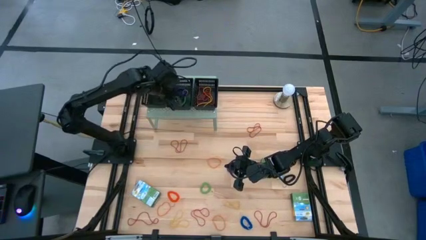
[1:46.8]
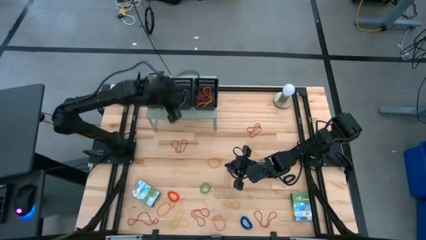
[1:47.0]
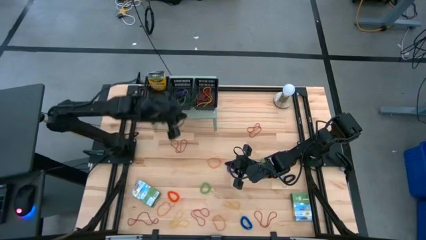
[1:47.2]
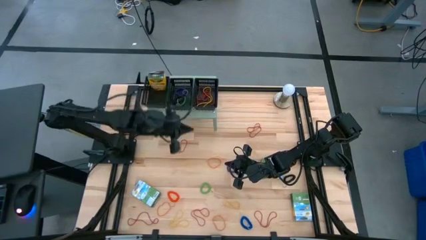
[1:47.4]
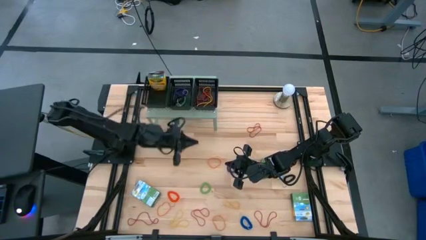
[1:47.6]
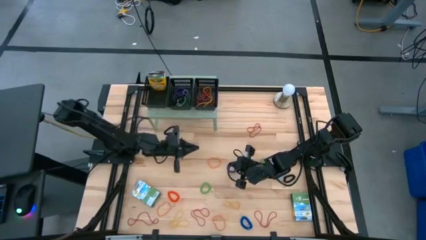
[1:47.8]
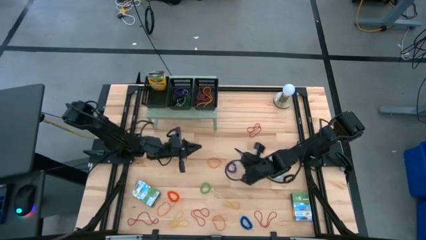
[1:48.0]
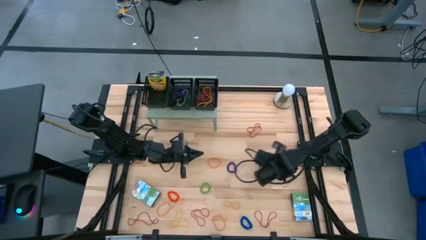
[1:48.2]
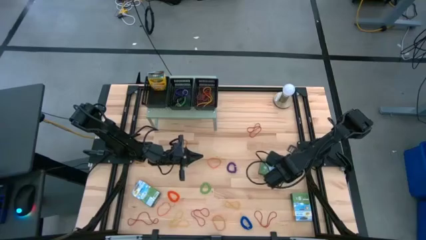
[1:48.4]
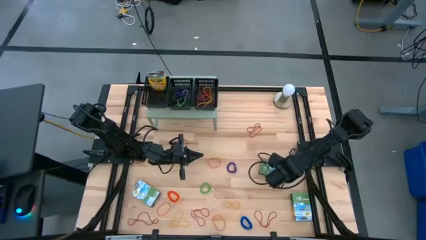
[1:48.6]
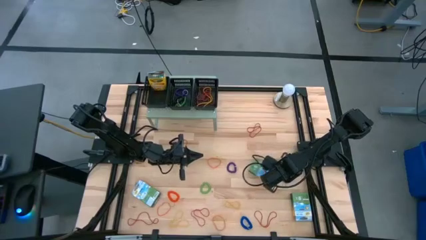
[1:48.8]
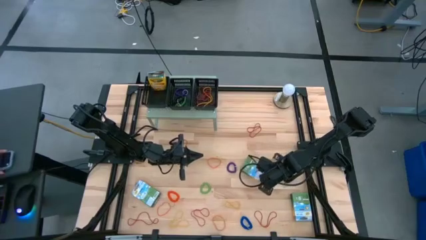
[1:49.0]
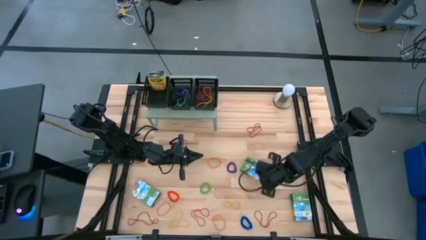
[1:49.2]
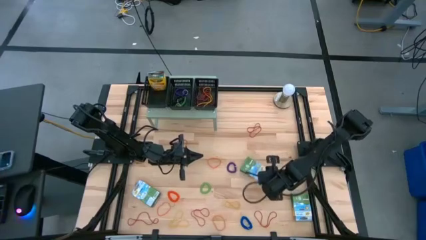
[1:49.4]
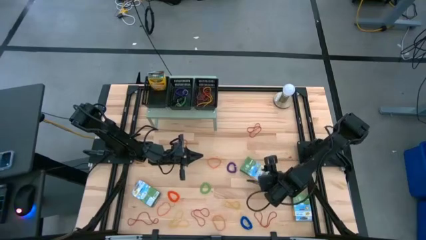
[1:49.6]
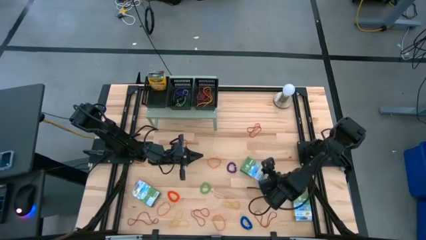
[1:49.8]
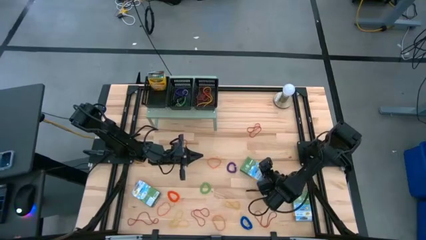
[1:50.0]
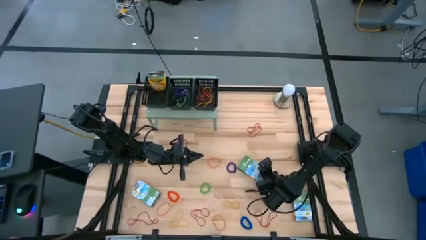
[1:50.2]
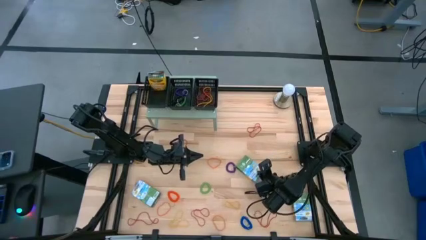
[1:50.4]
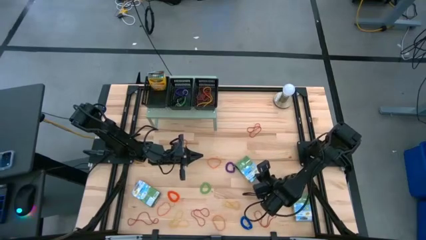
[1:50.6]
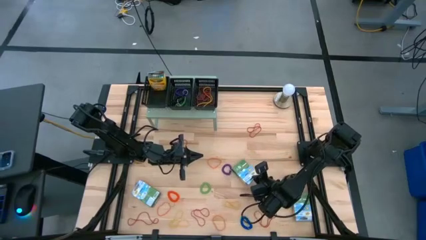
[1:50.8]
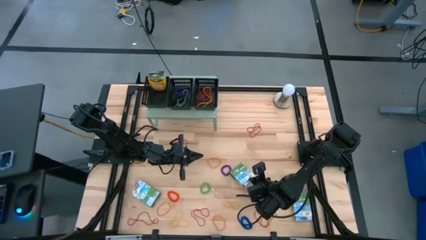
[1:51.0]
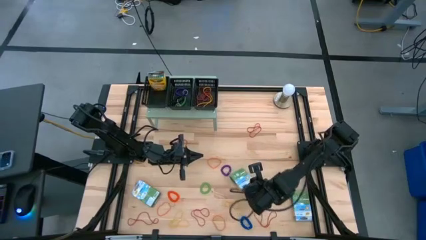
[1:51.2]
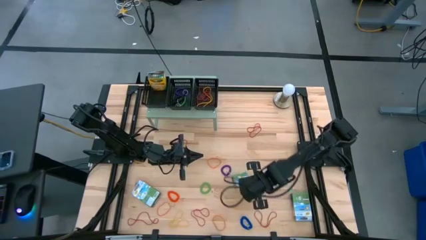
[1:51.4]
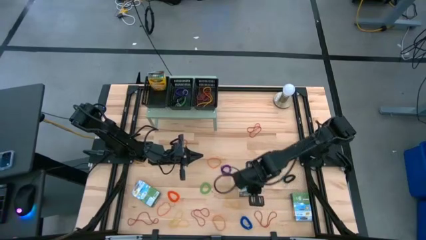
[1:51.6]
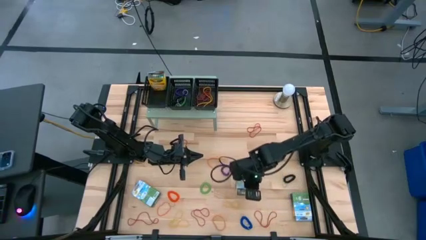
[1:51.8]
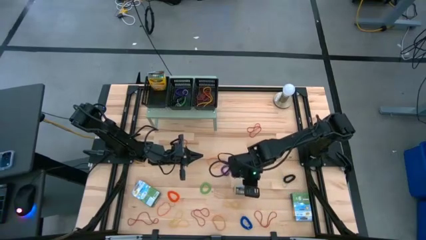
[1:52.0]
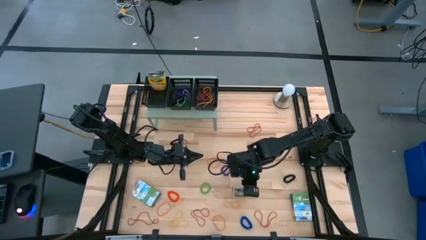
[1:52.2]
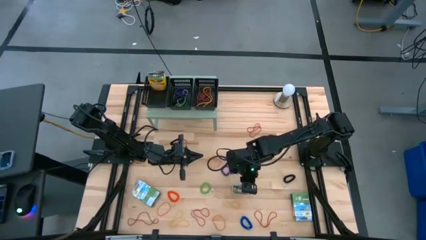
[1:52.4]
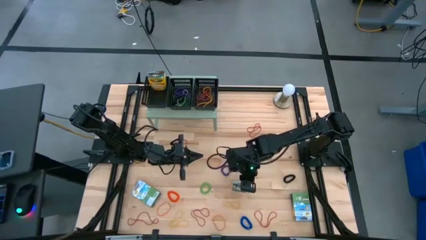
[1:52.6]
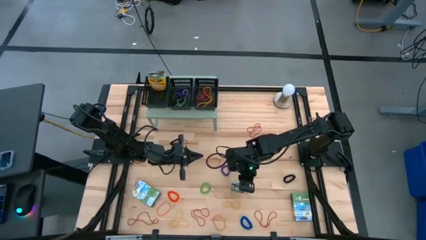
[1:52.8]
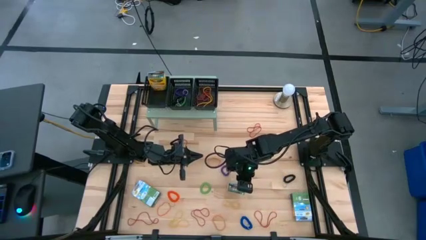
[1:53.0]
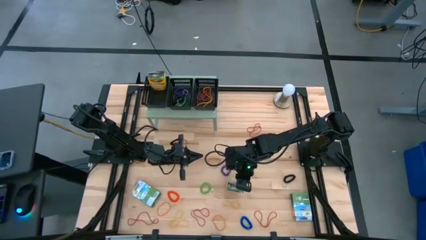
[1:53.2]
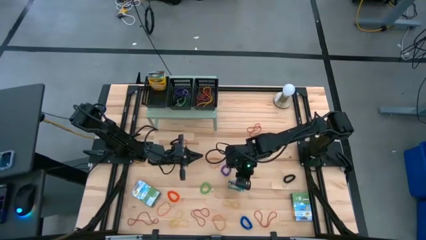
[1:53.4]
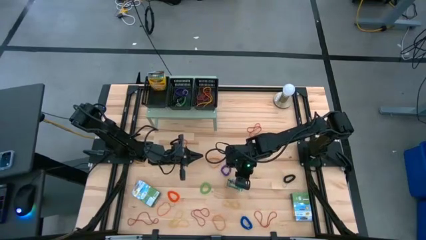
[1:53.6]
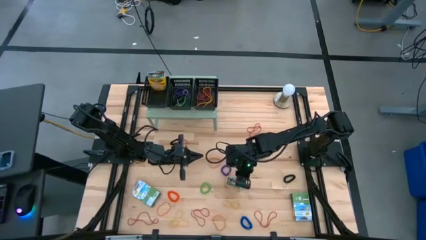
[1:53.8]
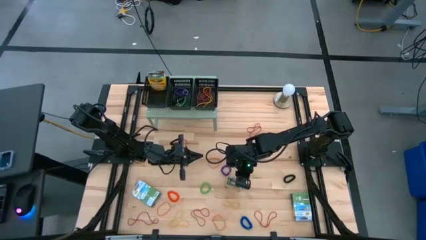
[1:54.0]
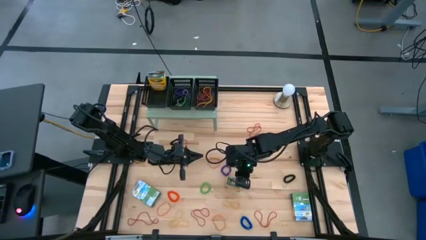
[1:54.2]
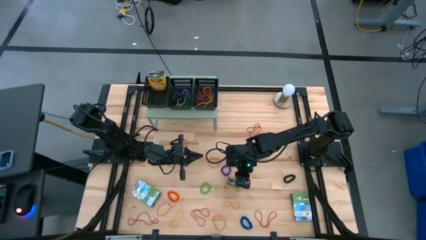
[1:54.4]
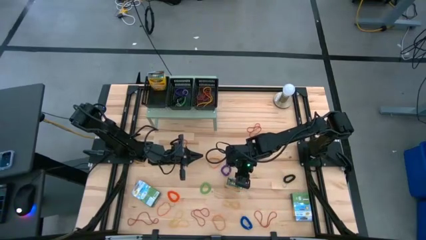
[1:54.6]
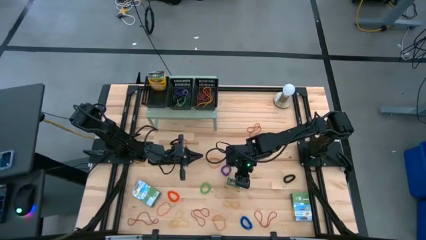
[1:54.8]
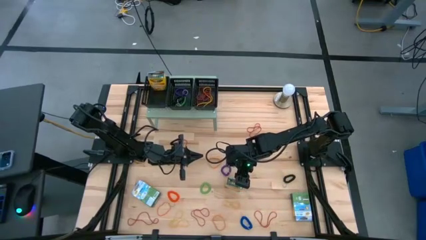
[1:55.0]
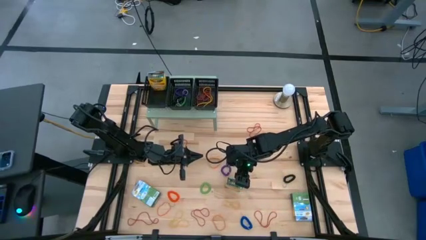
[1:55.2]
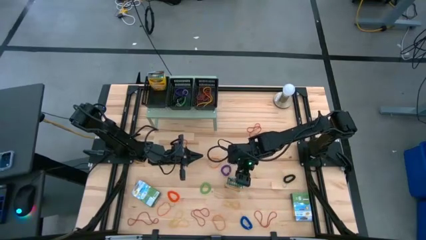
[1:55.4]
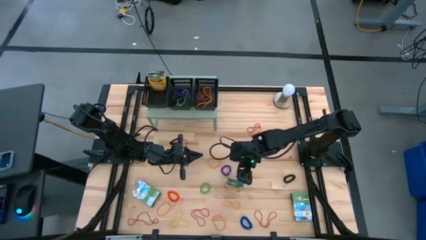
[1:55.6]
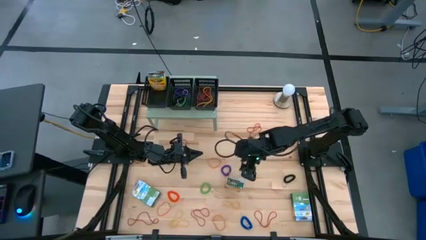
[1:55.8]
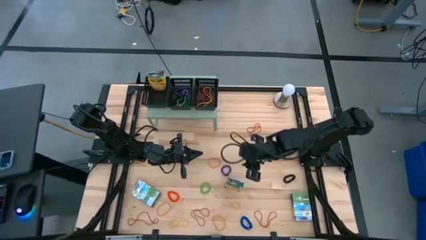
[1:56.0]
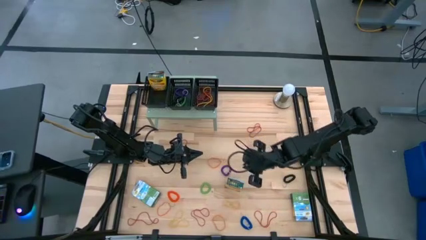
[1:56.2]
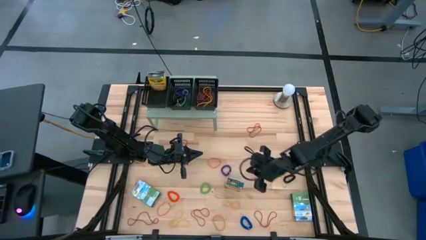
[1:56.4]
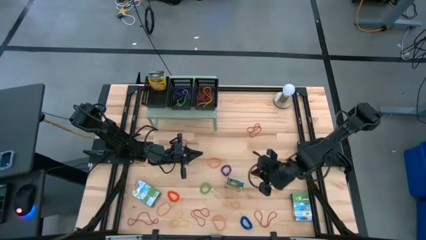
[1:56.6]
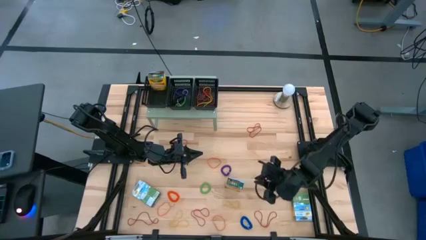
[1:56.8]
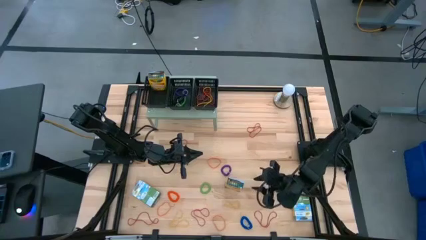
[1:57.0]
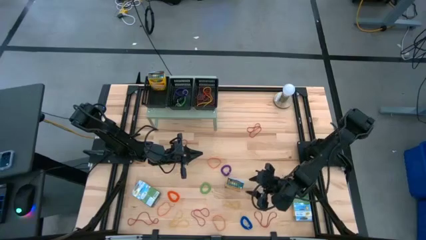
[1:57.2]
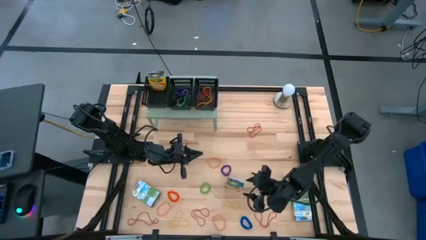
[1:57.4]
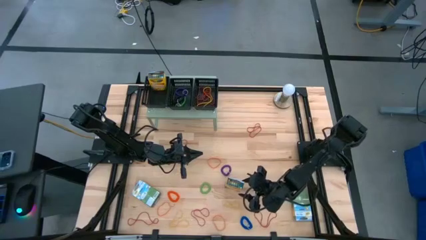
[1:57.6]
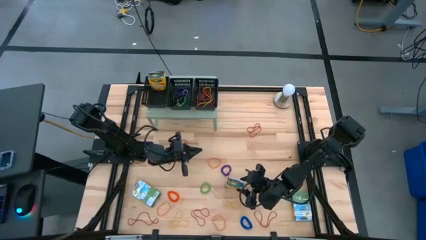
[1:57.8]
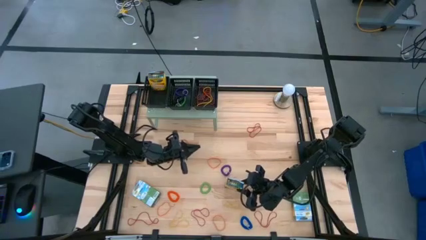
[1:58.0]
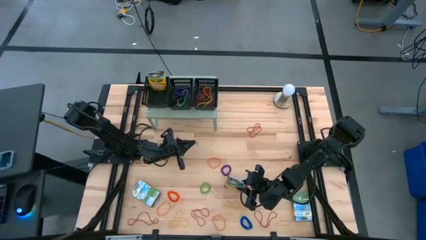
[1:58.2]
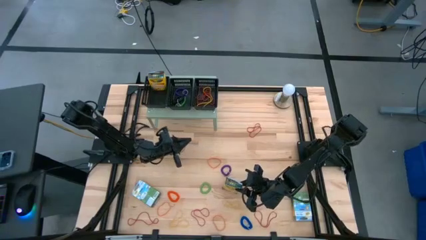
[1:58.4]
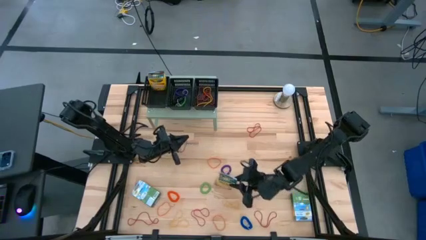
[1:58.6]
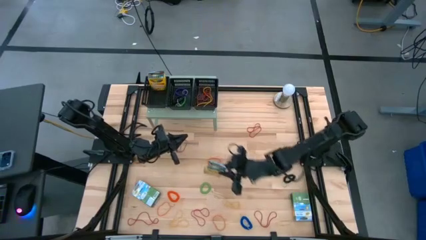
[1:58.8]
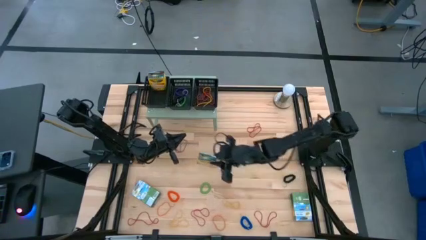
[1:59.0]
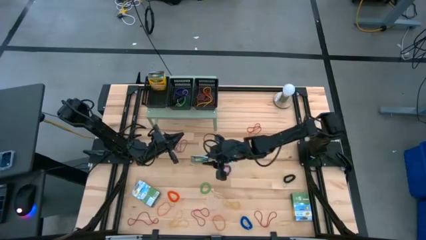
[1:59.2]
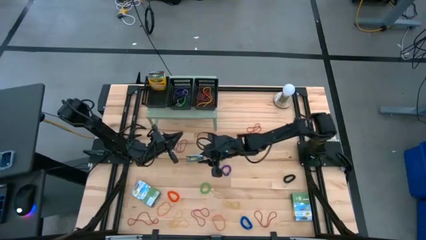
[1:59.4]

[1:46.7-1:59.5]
Task: Pick & Place Office Desk Supplies
Put the crayon box into the left black bin on the shelf

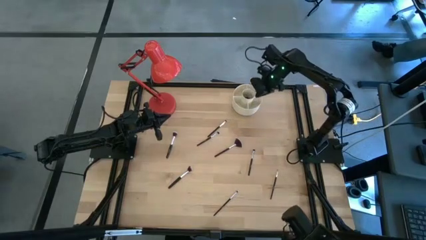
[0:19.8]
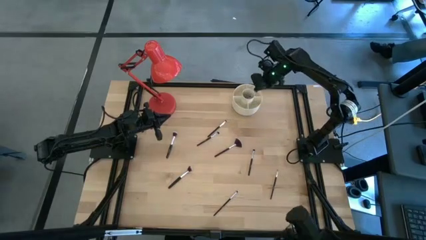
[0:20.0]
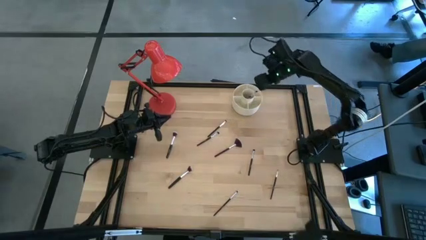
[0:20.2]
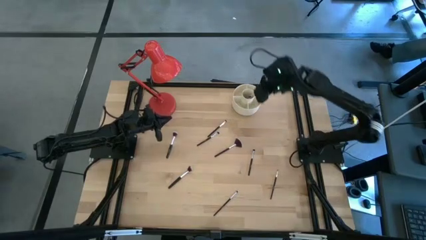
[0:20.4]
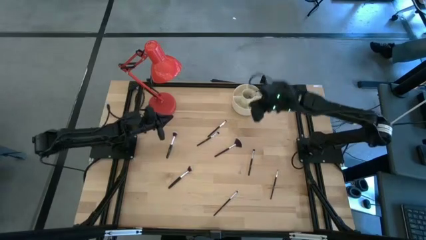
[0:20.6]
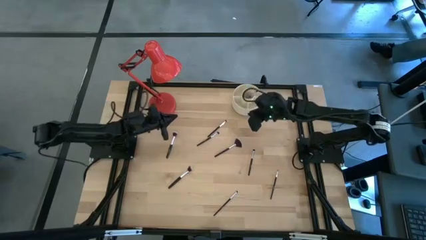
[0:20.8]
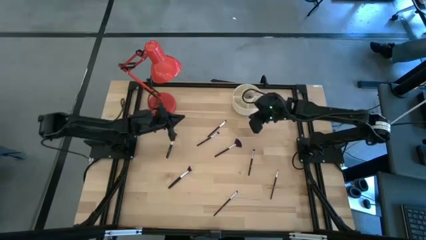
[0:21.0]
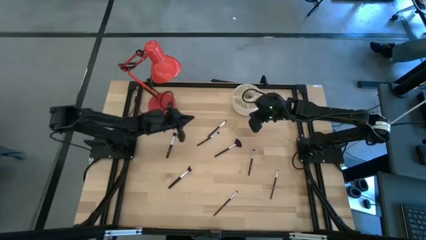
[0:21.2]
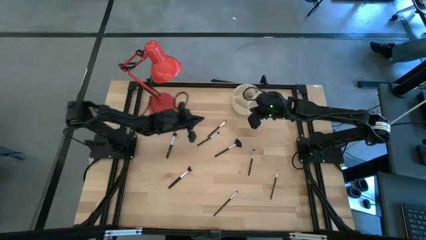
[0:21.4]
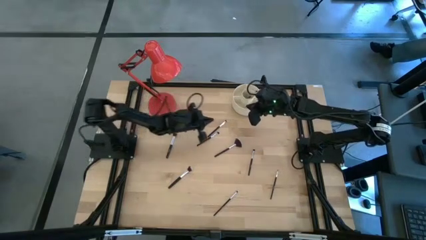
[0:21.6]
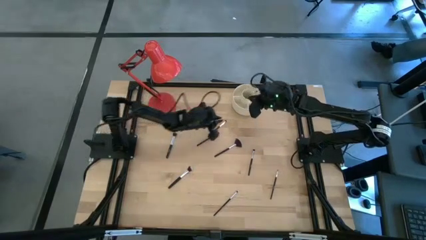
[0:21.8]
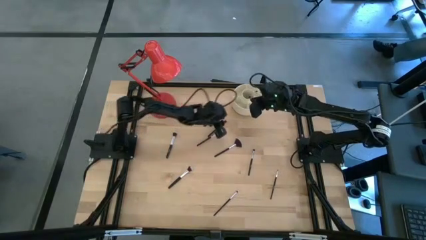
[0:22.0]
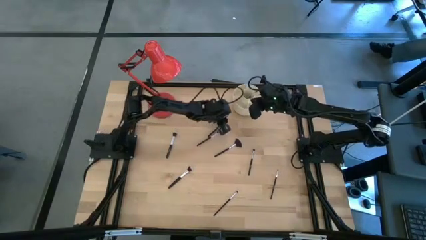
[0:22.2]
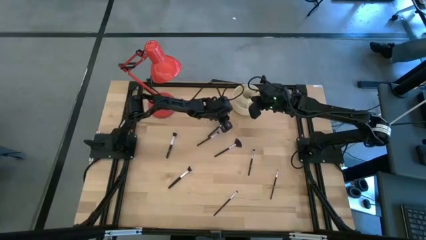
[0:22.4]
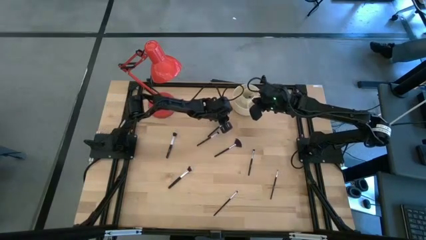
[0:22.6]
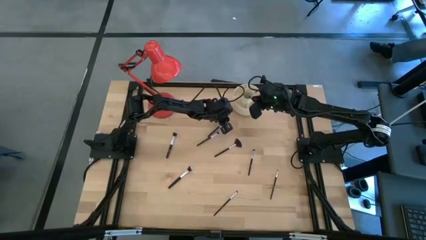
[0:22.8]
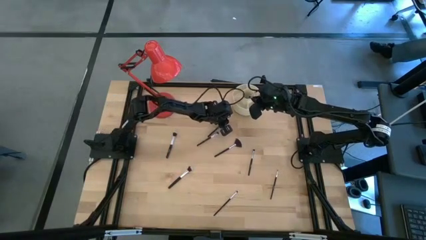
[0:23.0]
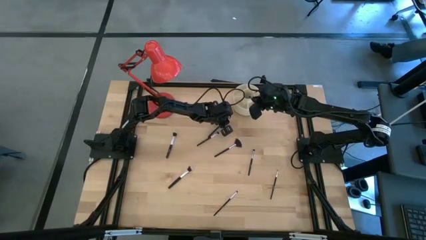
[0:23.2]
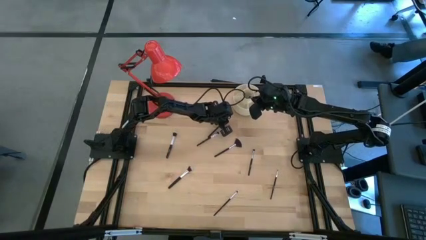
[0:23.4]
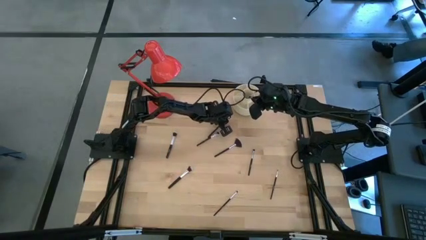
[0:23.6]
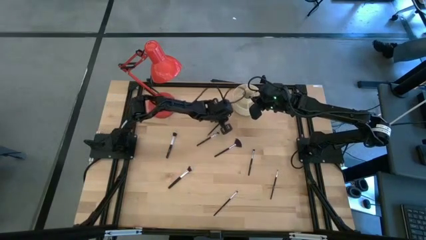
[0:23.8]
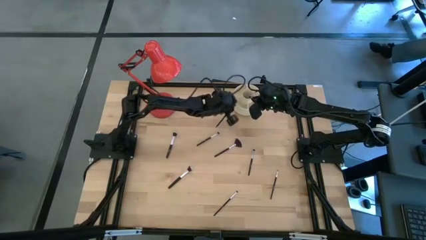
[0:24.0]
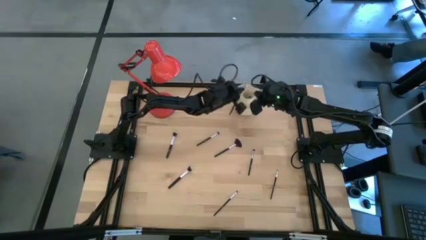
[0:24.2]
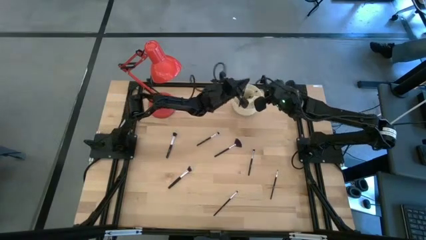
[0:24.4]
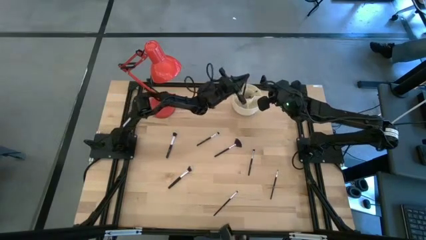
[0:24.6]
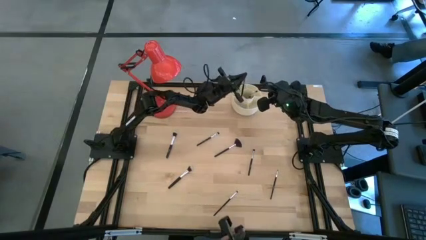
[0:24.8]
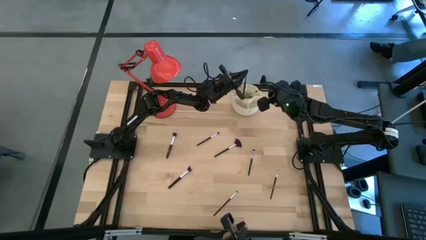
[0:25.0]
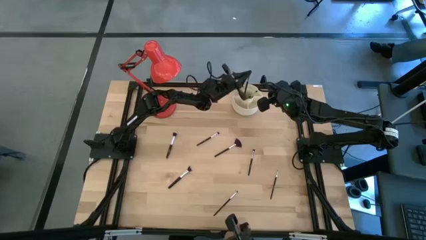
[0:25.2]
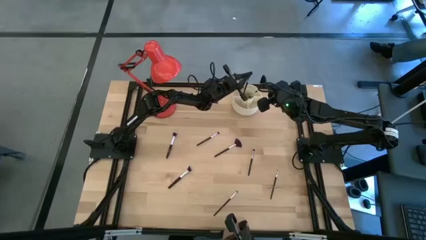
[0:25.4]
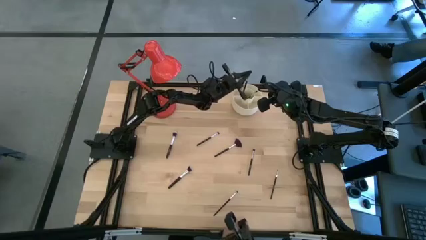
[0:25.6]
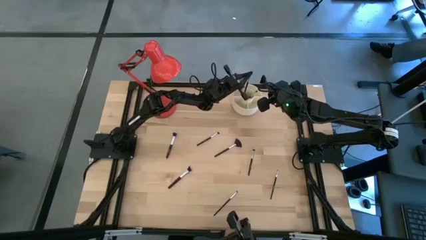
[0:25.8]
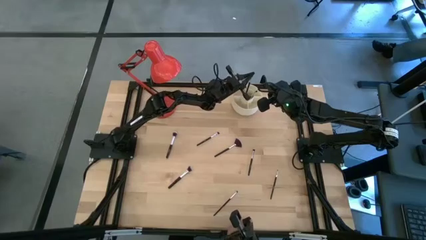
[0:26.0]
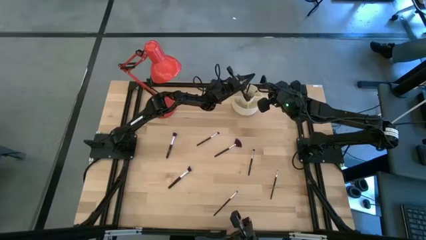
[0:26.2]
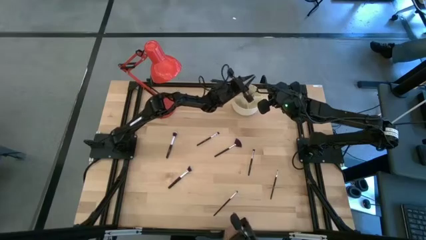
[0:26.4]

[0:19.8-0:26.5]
Task: Put items in baskets/containers
Put the black eyeshadow brush into the white organizer
